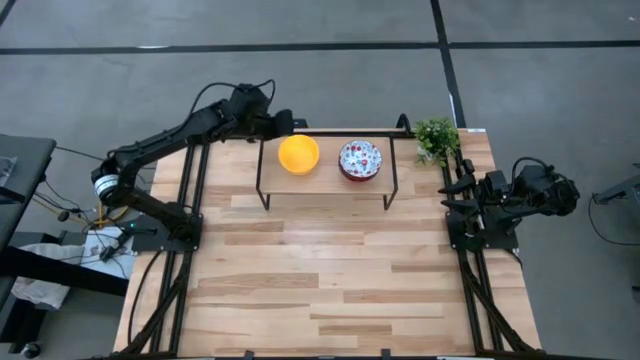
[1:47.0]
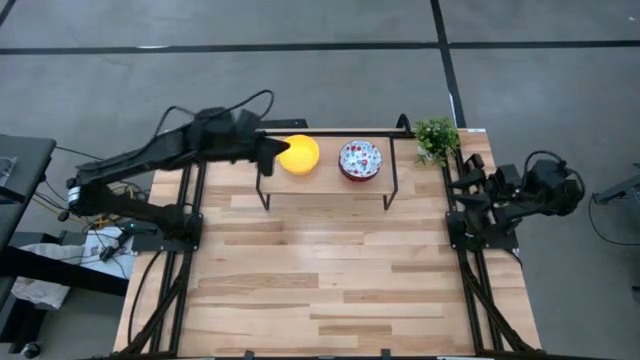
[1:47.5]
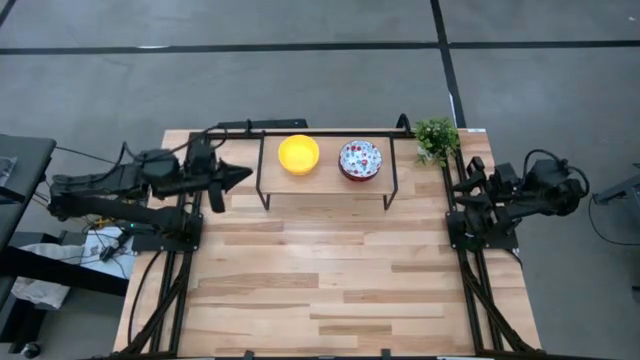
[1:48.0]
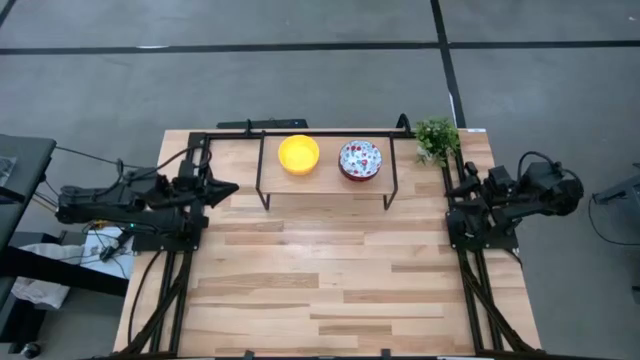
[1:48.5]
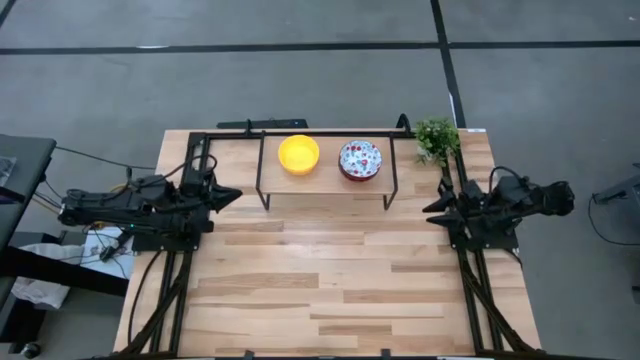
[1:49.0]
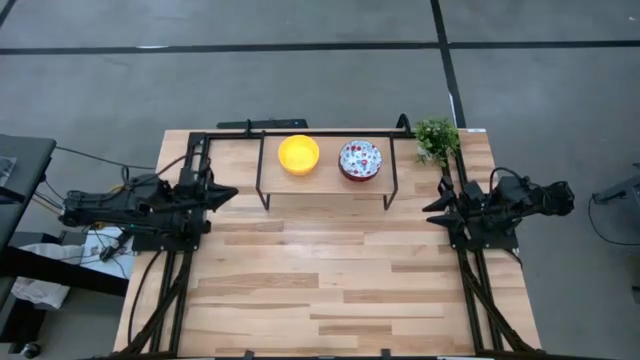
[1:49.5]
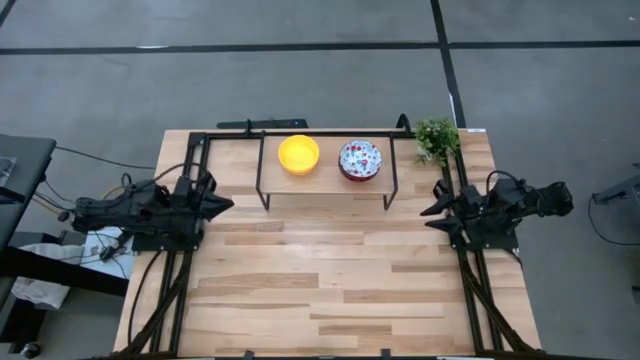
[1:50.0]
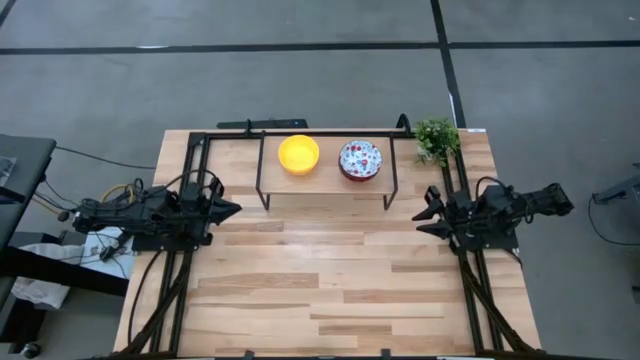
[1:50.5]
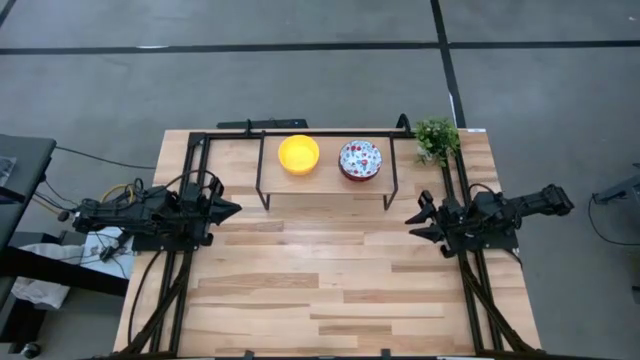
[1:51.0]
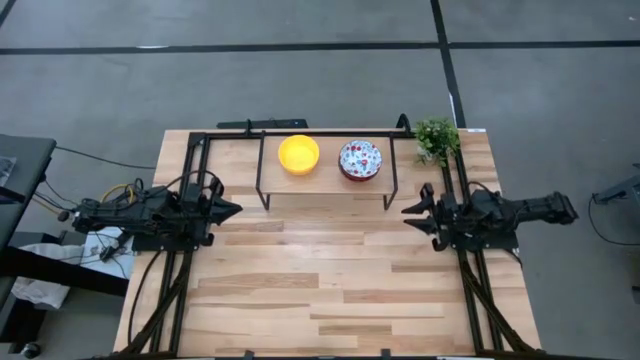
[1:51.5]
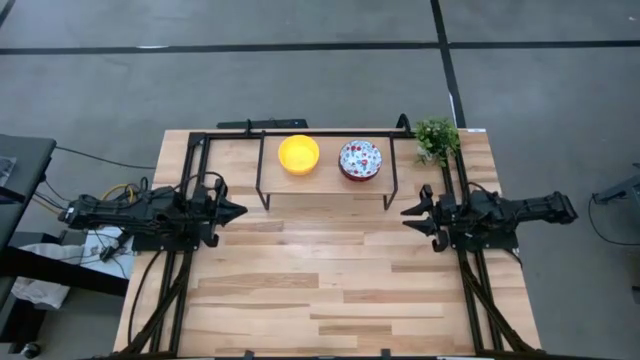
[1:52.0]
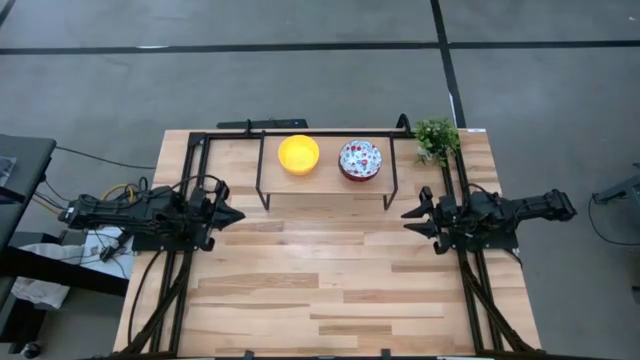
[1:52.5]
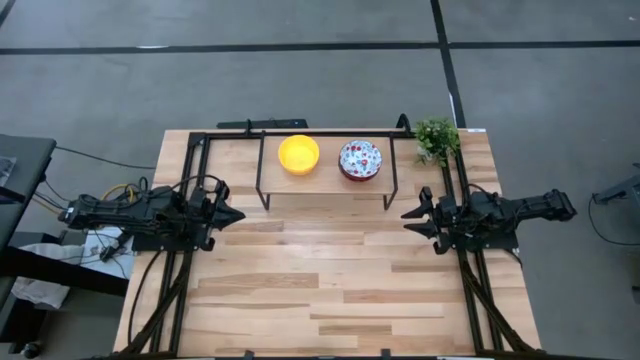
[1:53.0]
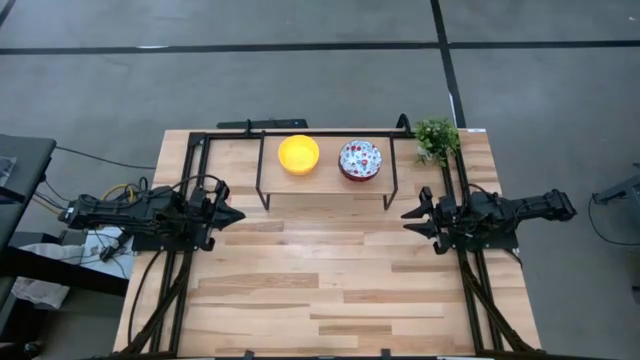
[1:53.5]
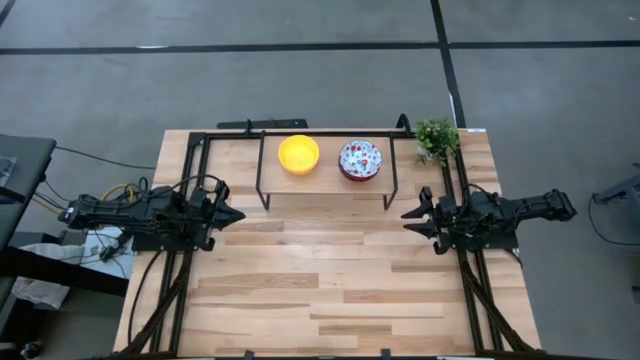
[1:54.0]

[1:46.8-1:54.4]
Task: Pick & Place Mini bowls
Return to Home Position

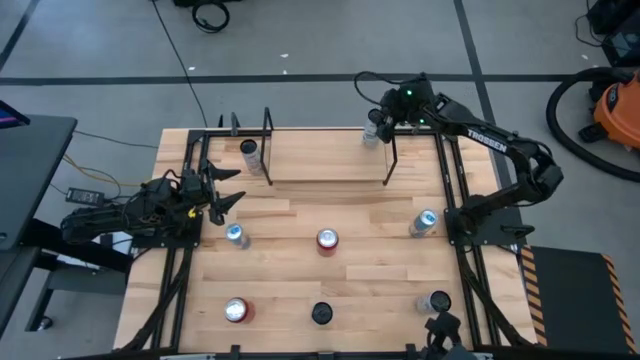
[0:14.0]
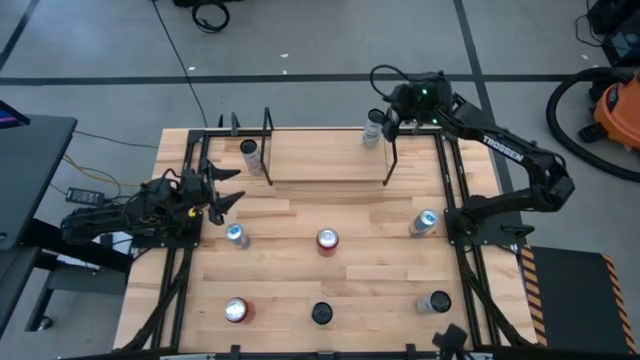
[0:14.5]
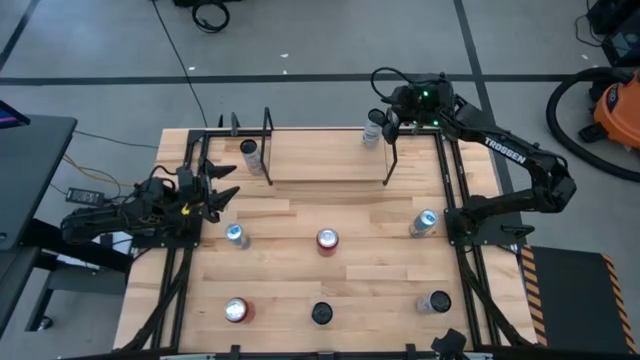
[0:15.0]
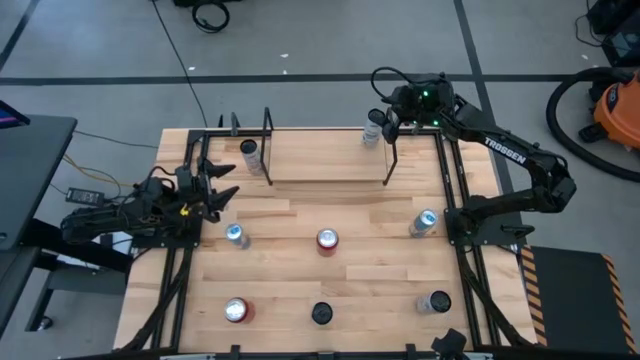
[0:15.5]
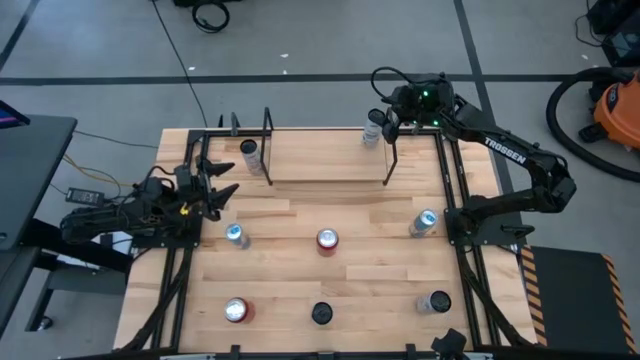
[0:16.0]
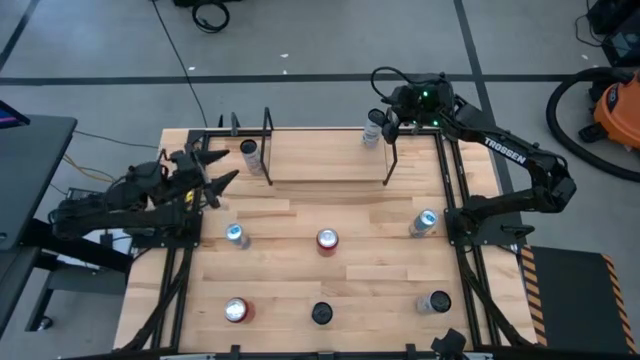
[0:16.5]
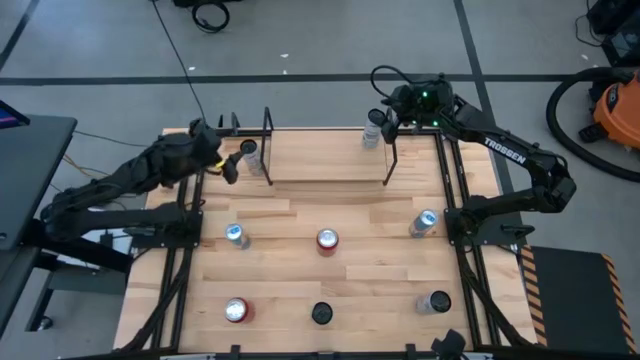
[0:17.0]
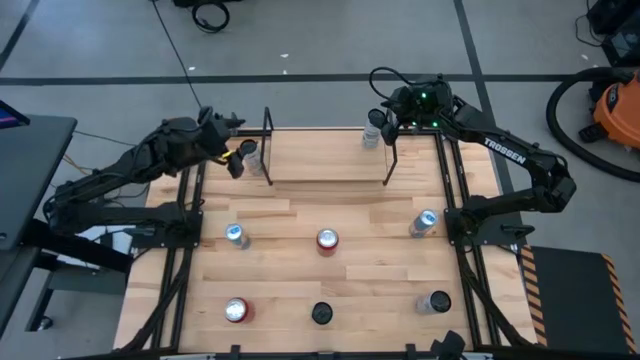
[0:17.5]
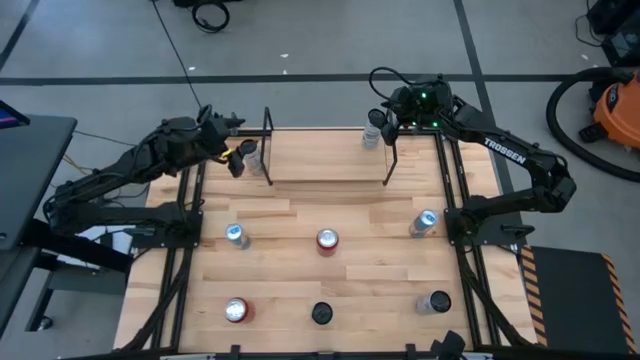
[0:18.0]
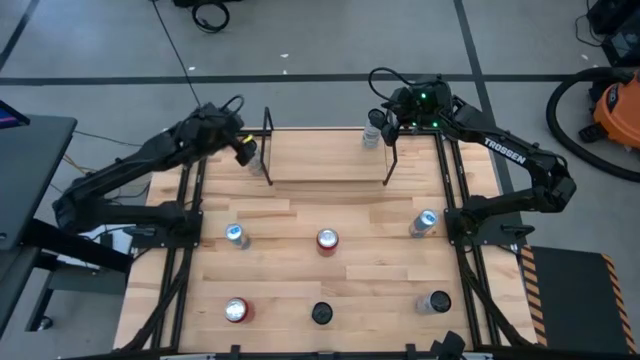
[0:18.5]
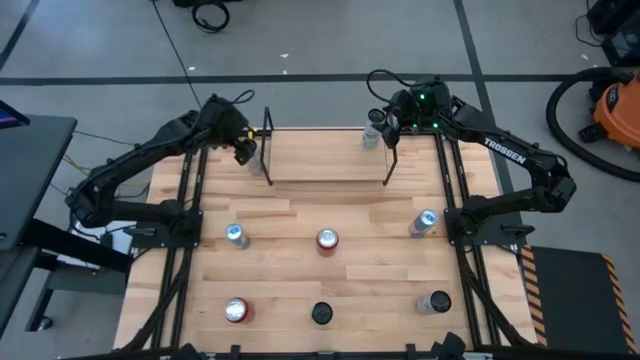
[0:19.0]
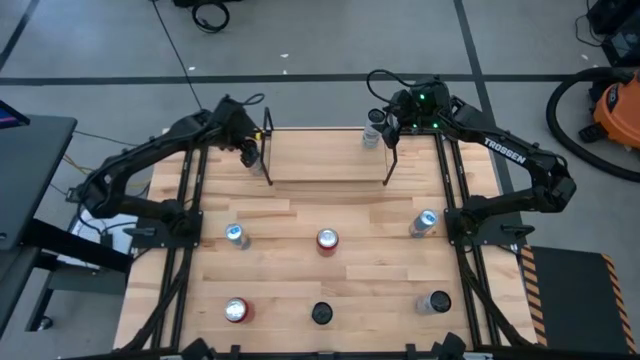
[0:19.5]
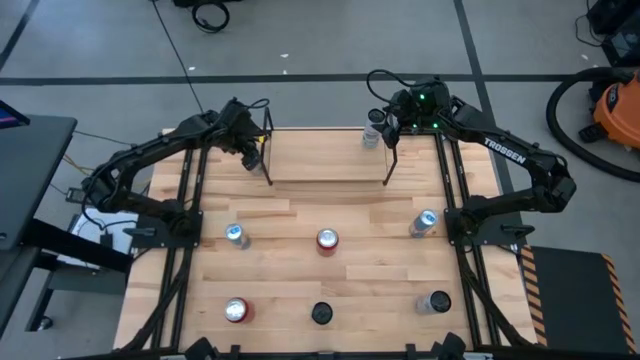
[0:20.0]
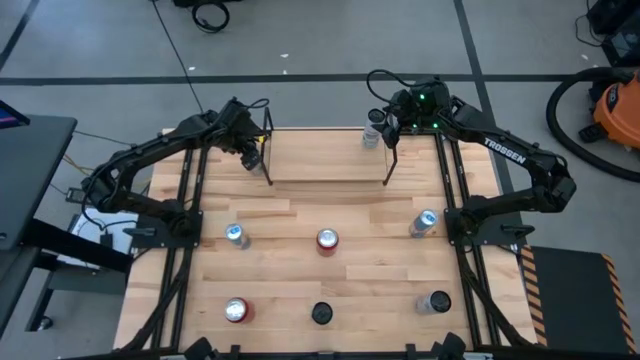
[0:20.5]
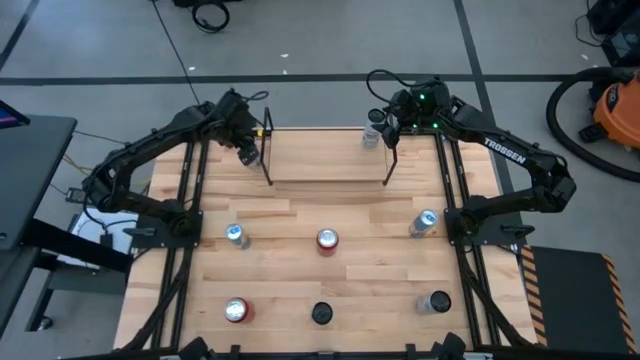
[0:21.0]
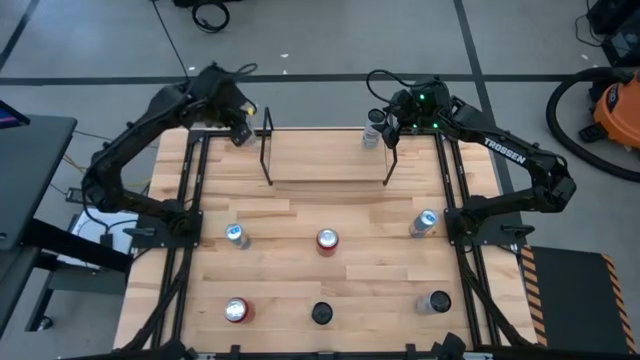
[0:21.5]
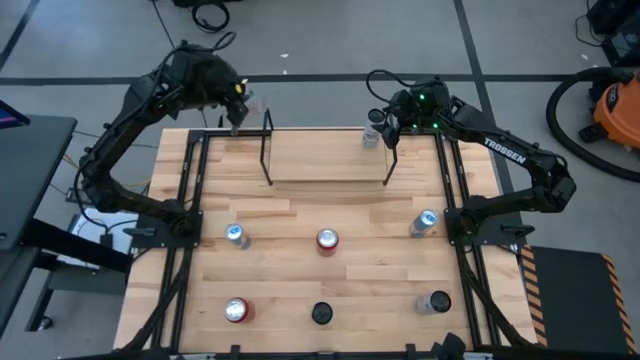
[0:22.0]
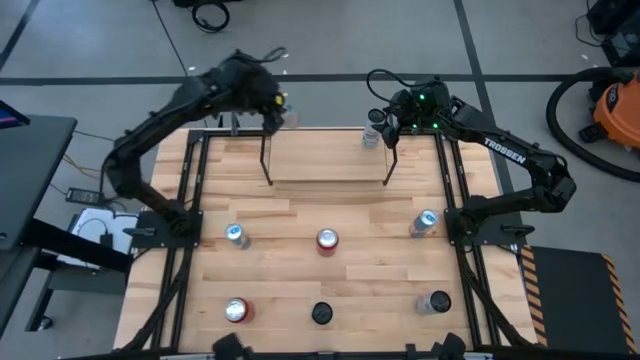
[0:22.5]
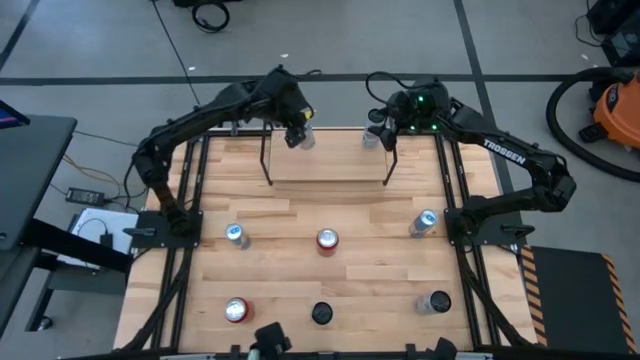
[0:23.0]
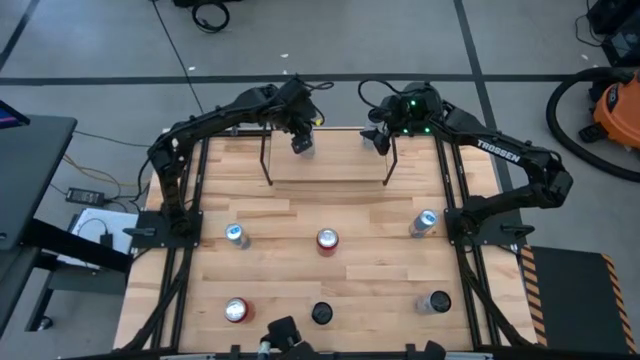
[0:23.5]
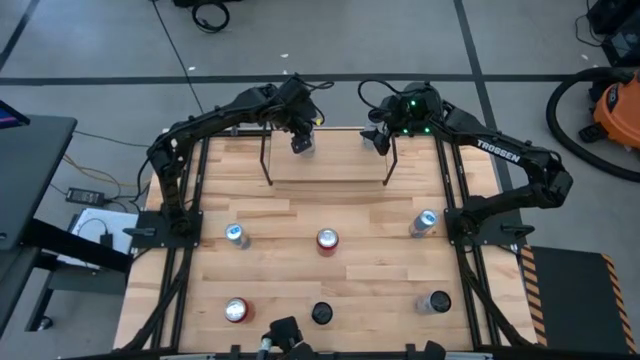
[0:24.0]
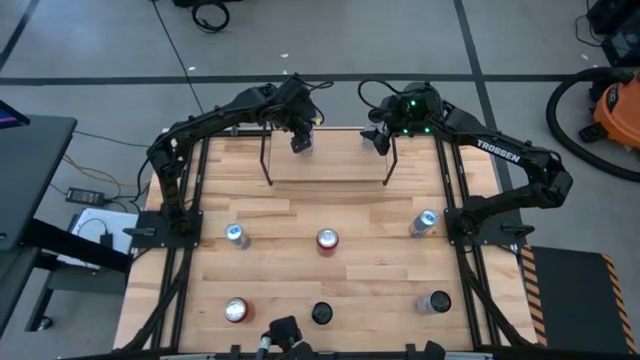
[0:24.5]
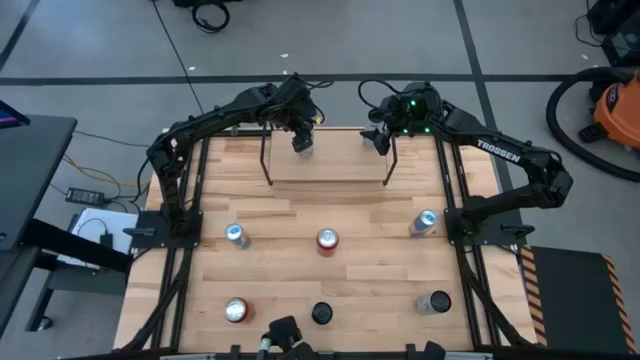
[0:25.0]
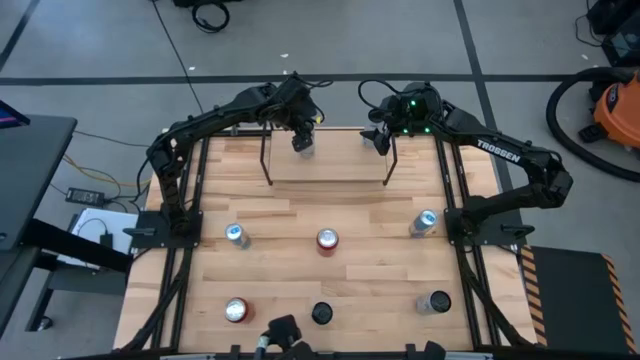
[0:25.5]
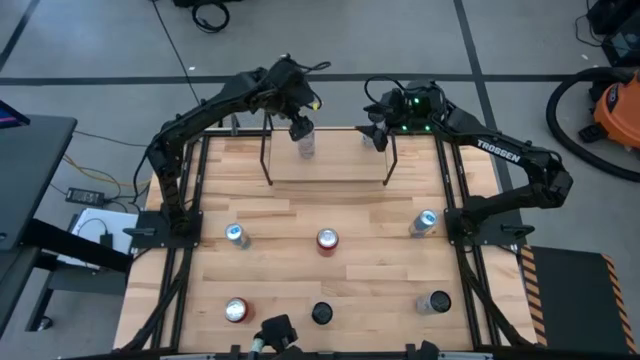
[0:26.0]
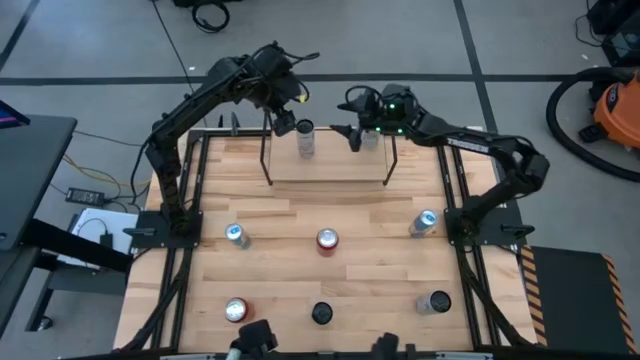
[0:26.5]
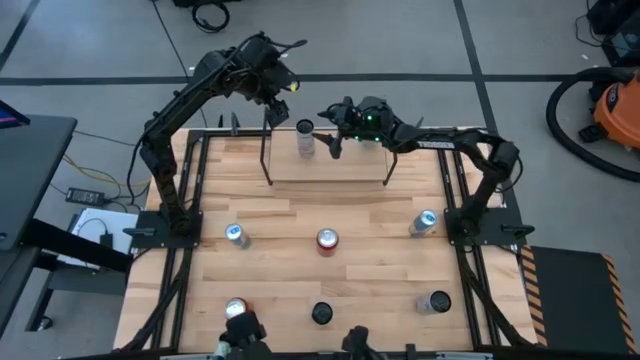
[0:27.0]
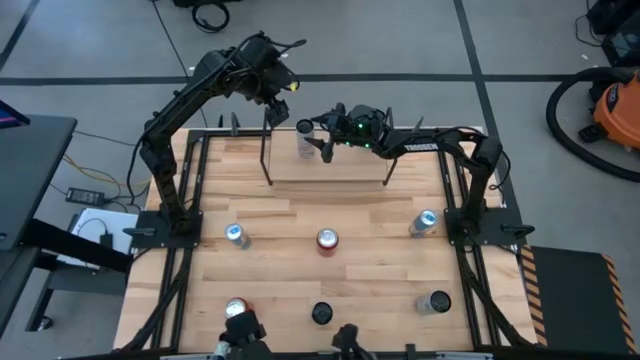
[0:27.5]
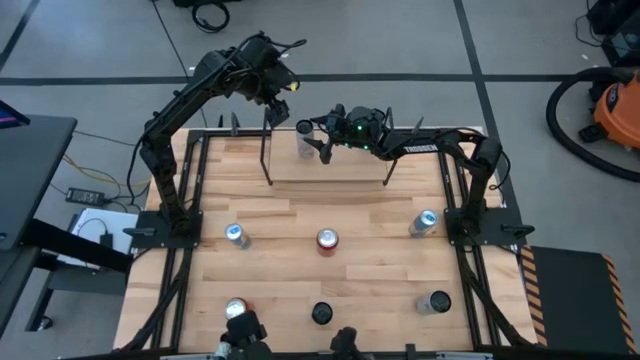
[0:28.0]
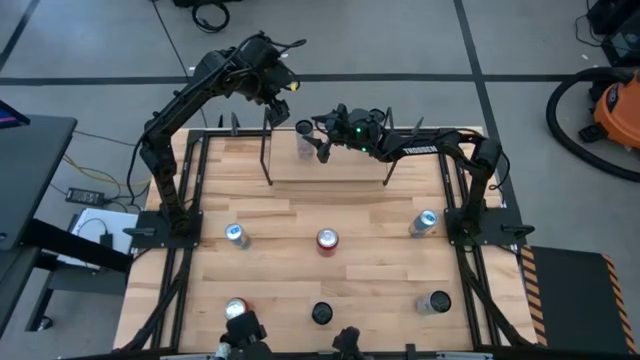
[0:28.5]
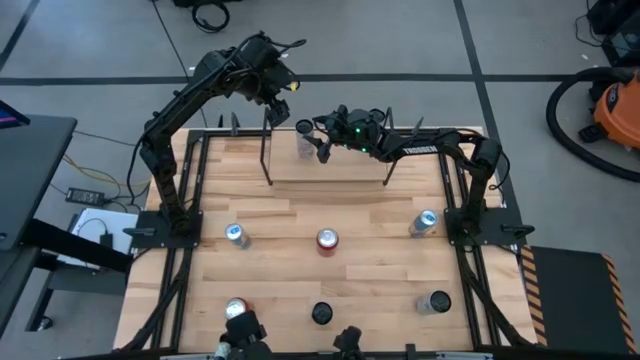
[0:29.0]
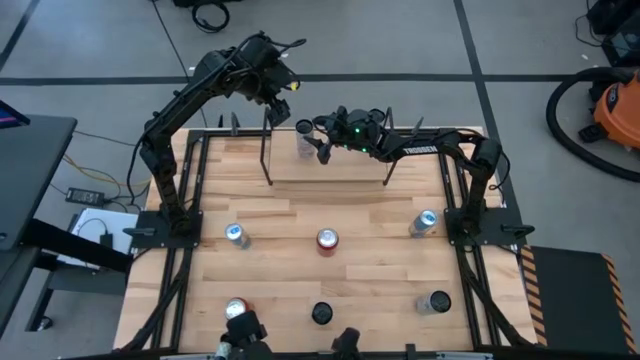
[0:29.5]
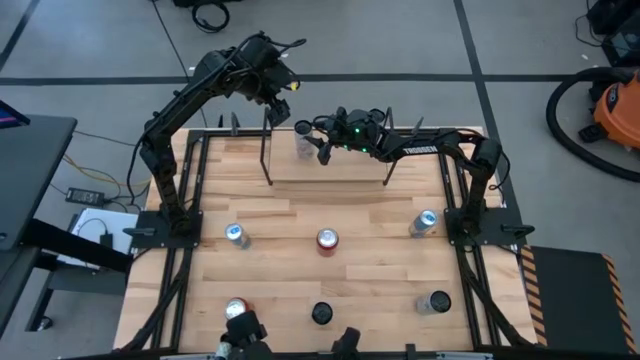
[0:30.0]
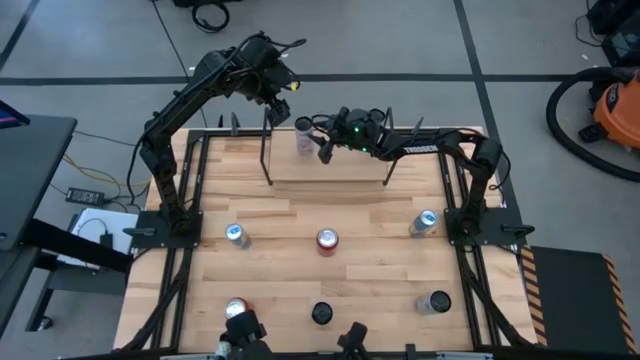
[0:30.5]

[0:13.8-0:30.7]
Task: Place canned beverage on shelf
Put the top white-pink soda can on the shelf
